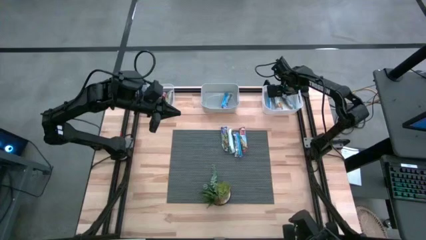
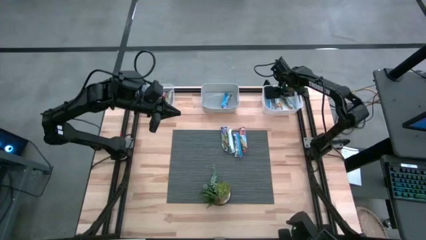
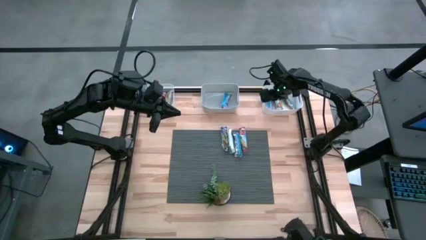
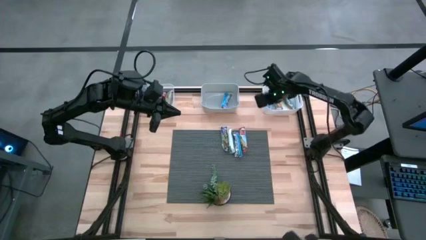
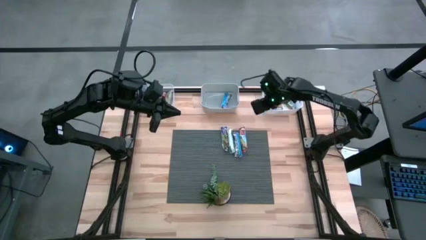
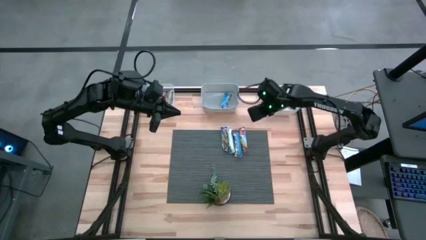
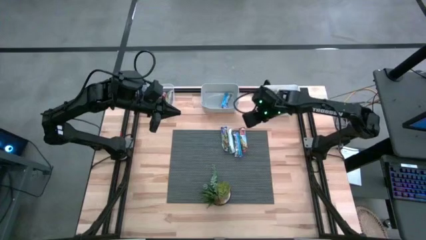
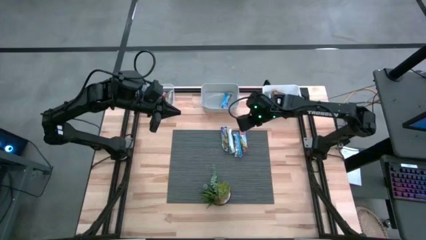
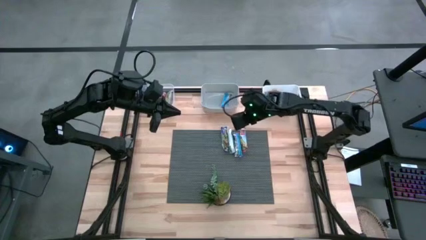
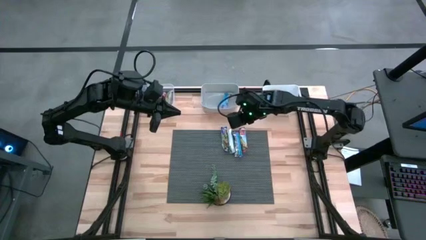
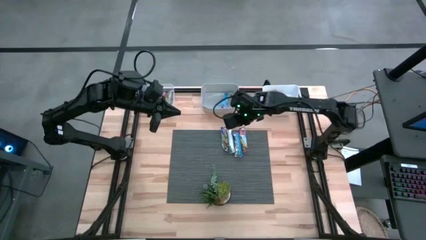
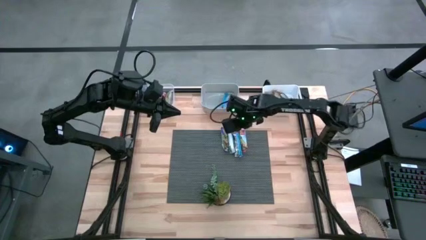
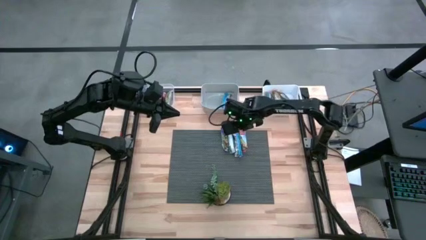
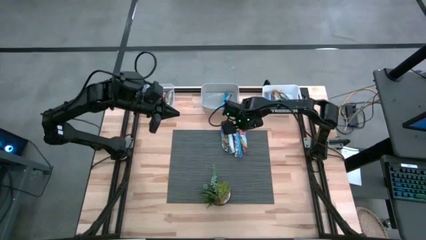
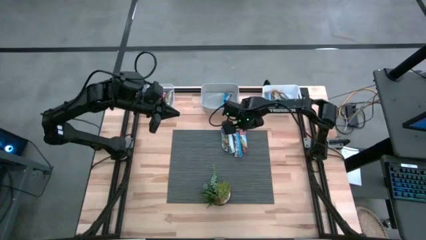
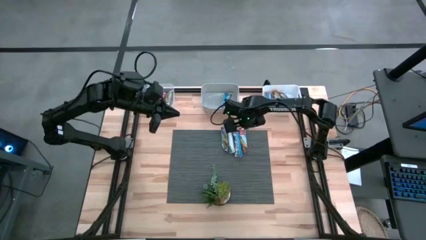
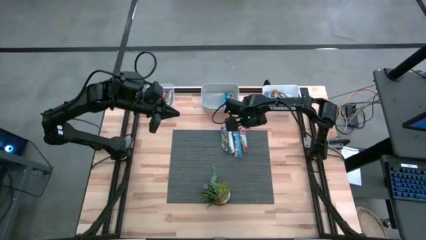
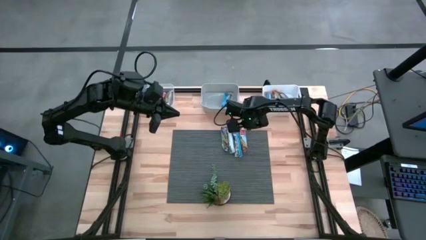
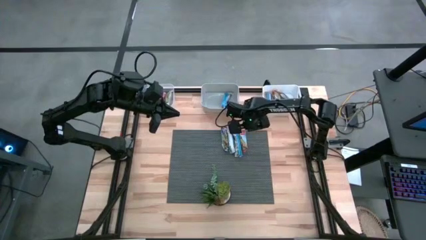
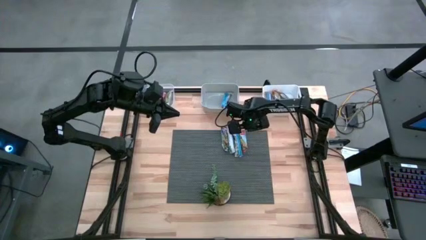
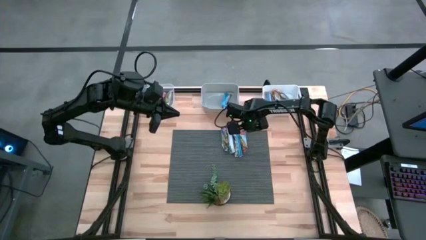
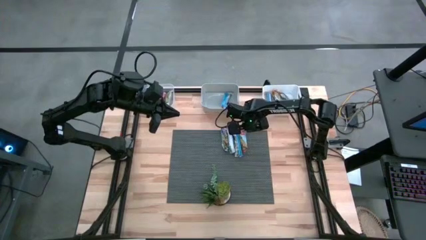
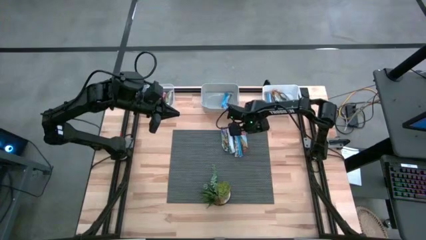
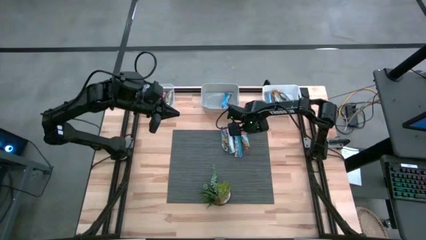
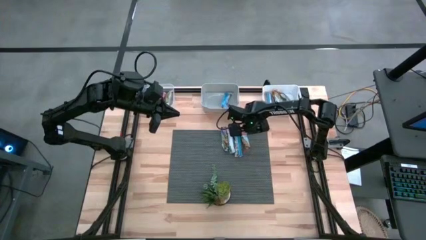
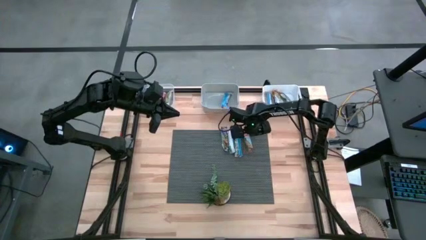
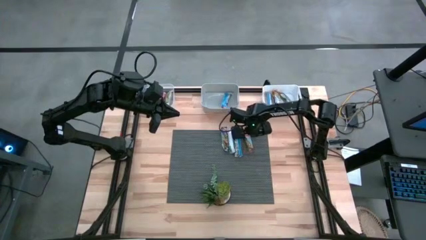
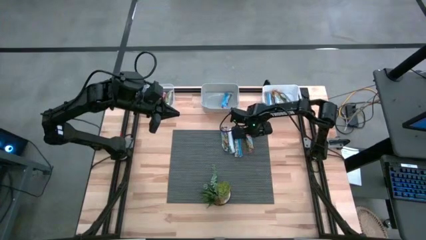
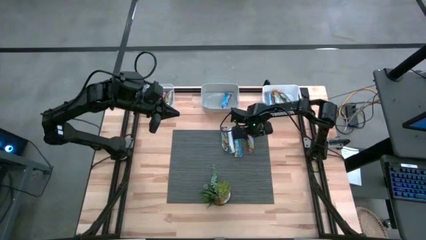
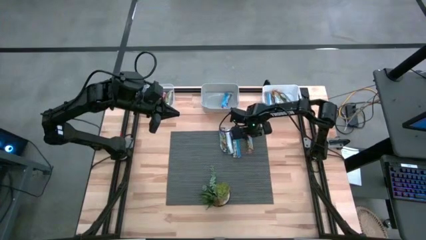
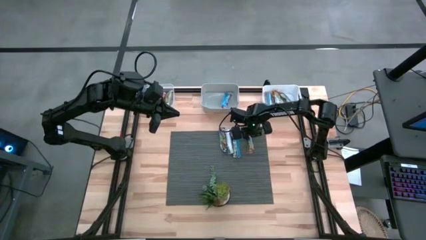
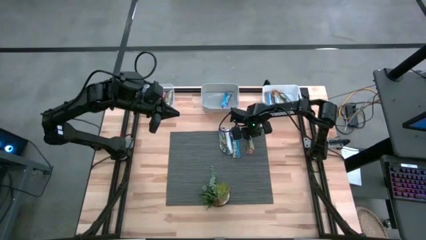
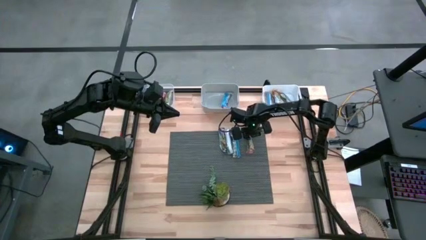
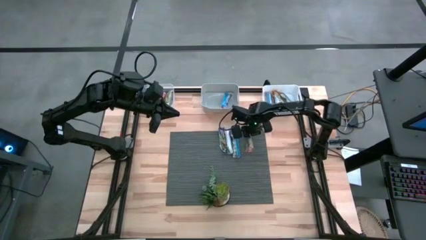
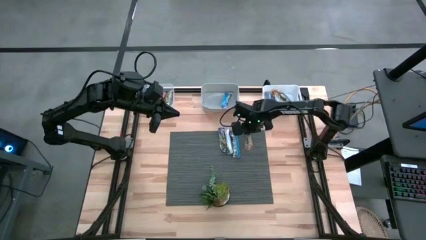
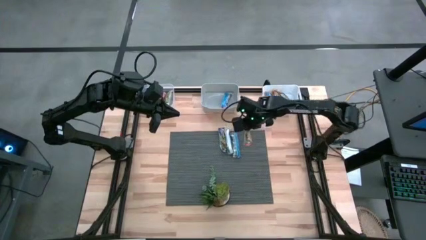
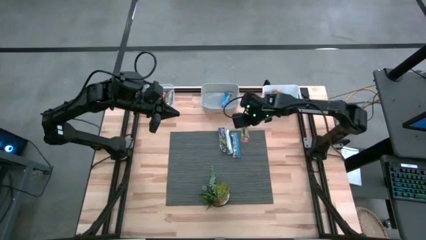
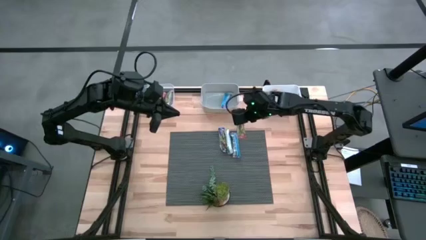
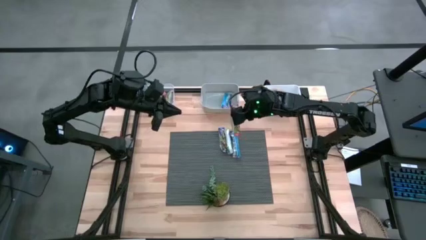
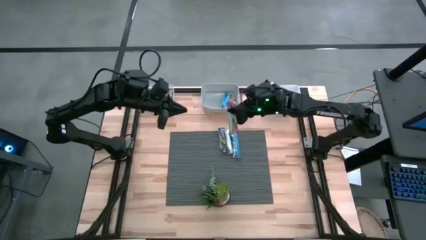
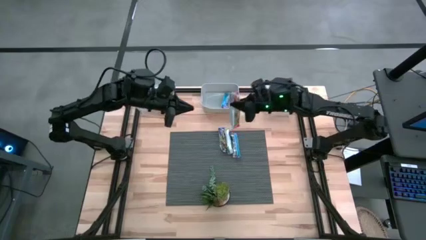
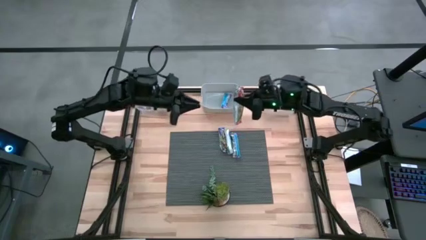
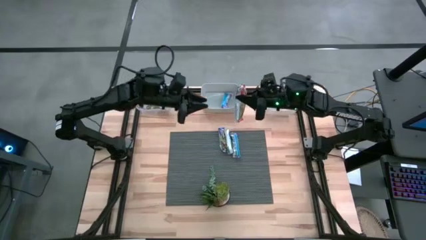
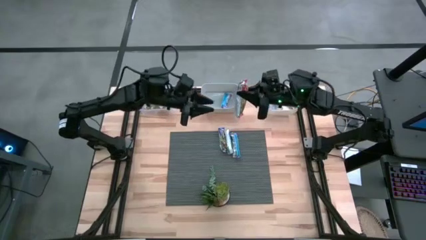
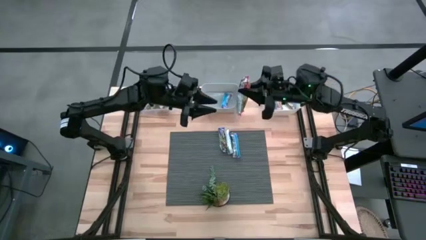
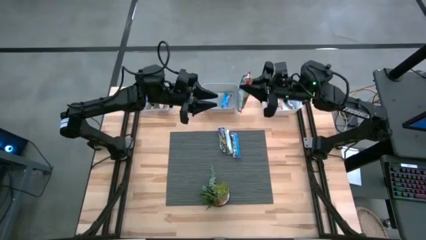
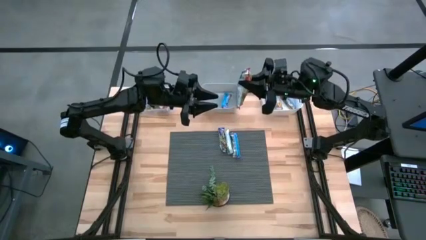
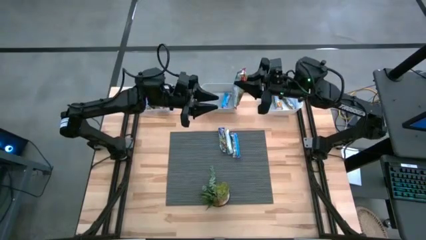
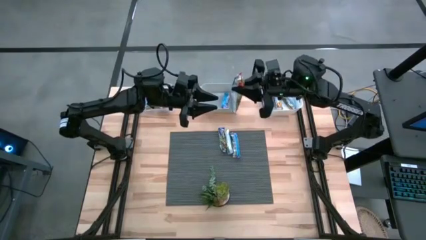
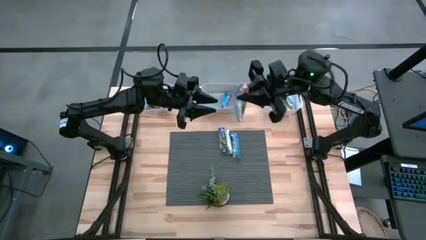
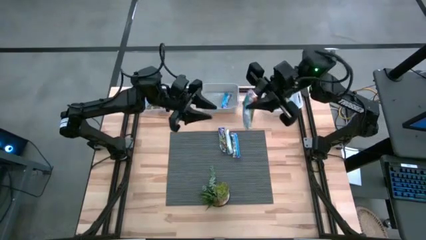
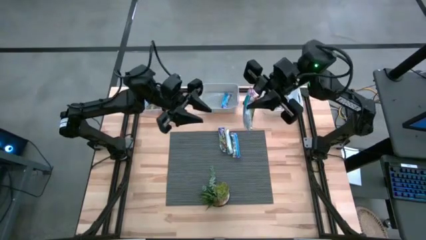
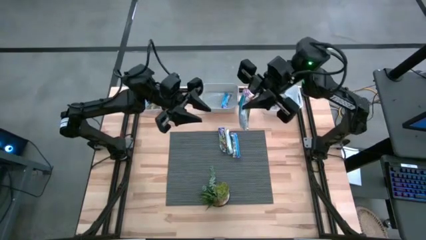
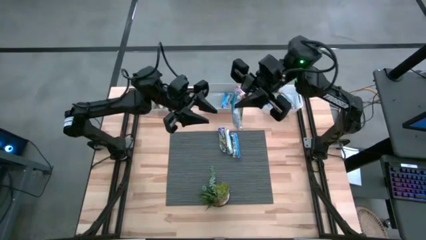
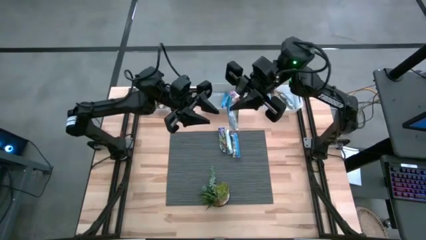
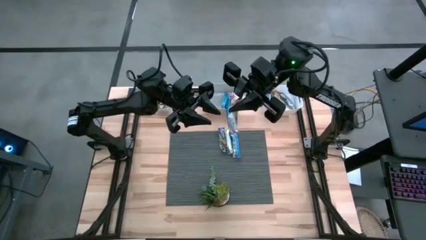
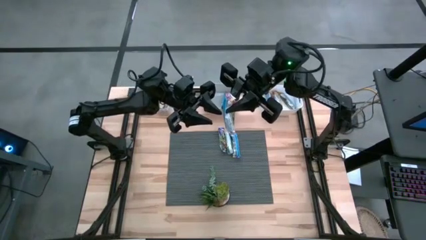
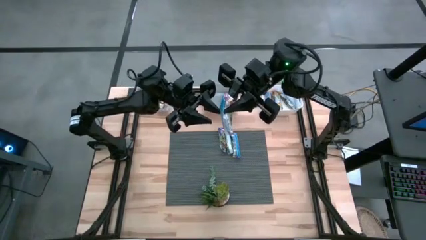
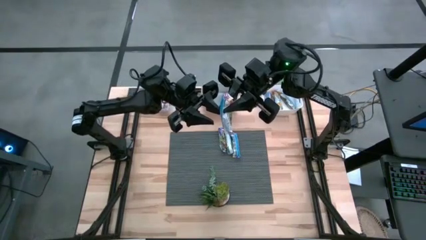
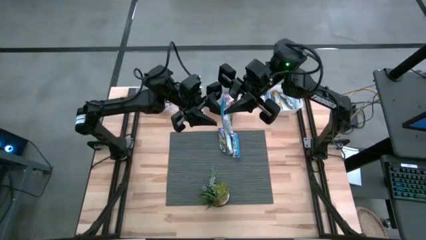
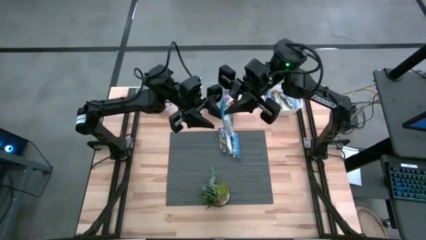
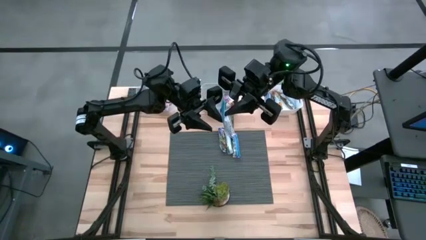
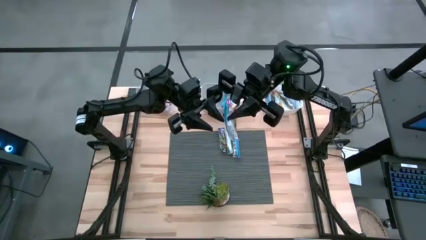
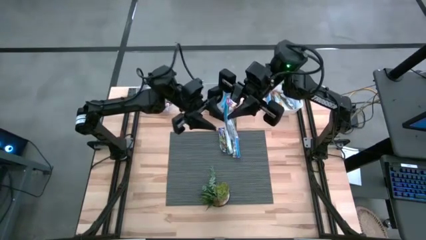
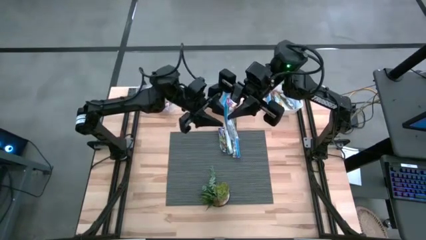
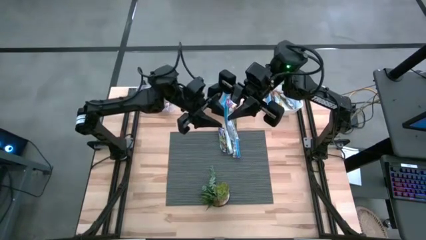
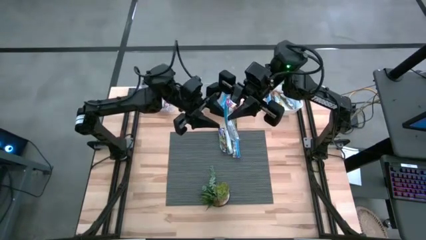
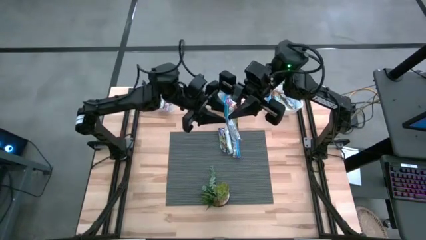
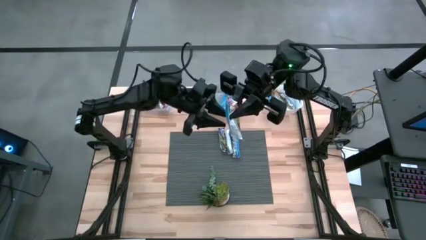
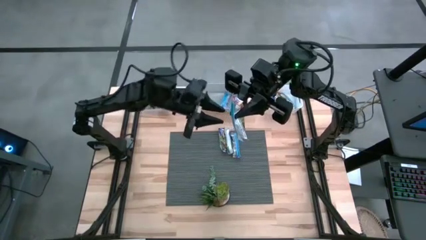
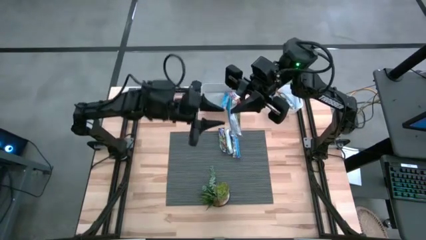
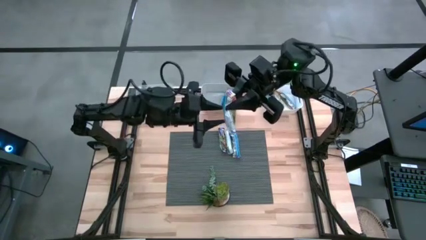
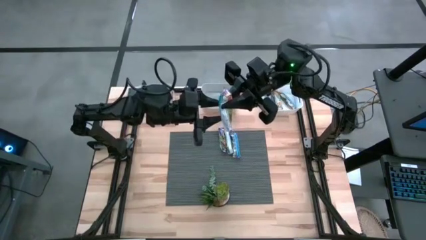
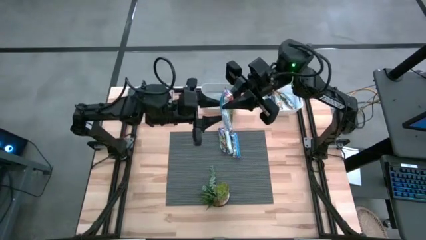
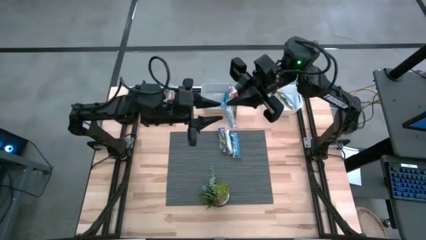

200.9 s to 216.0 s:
Task: Pick and place Granola Bars by type
Put the red granola bar into the transparent bin

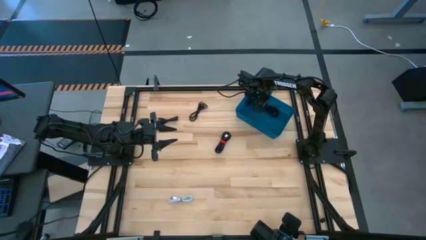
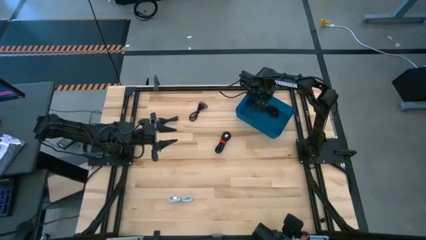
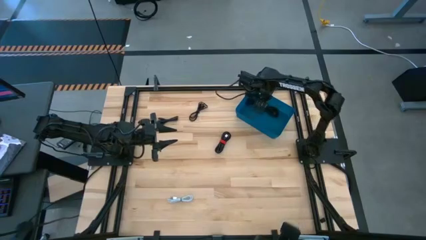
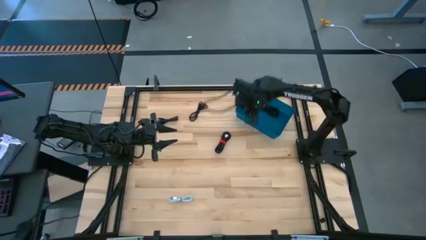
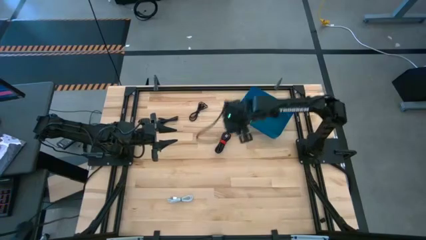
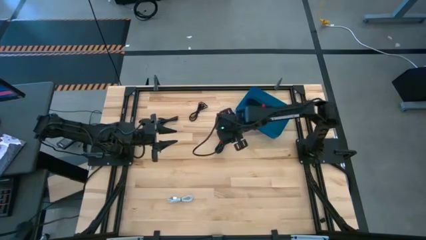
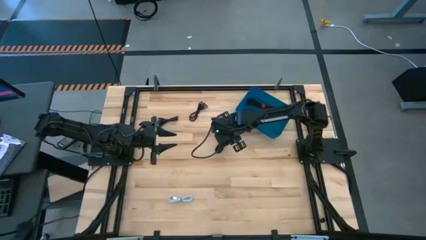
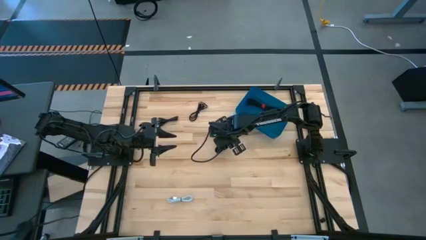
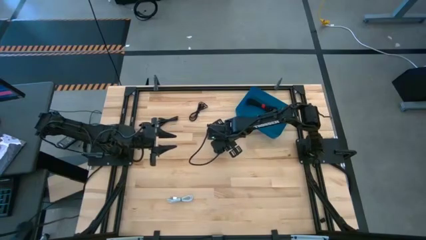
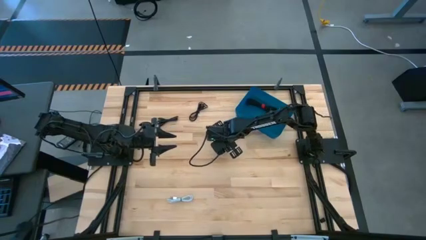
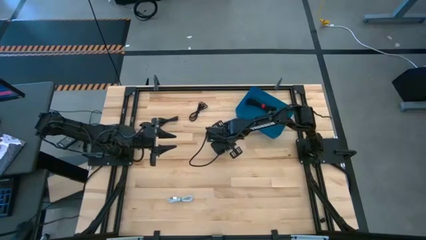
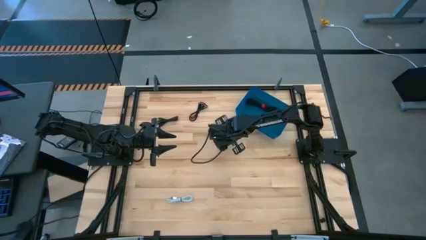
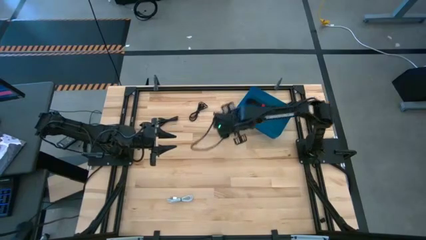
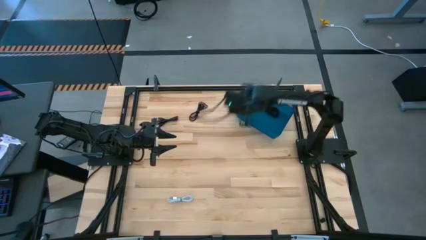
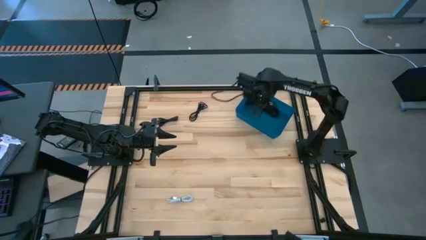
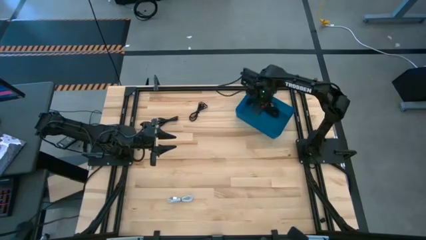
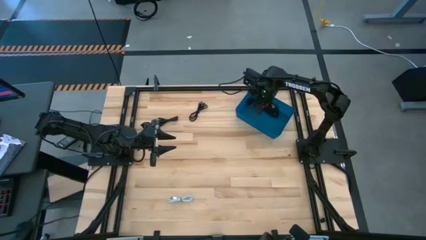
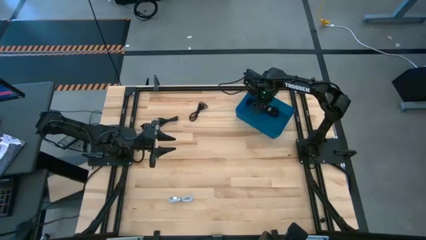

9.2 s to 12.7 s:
Task: Pick and place USB-C Cables
Put the right black charger cable into the bin
